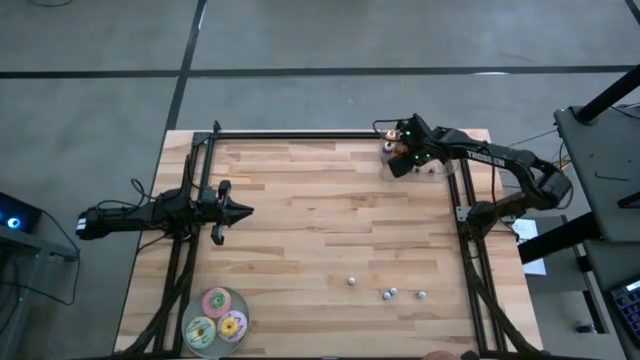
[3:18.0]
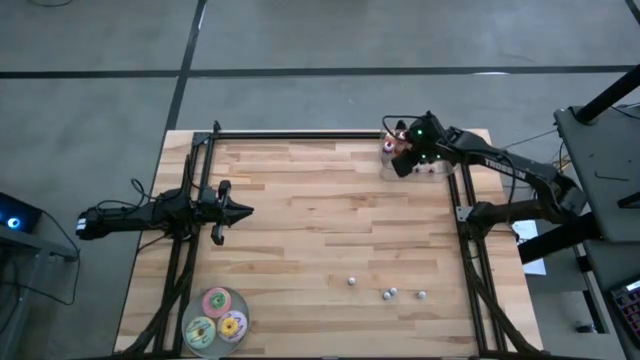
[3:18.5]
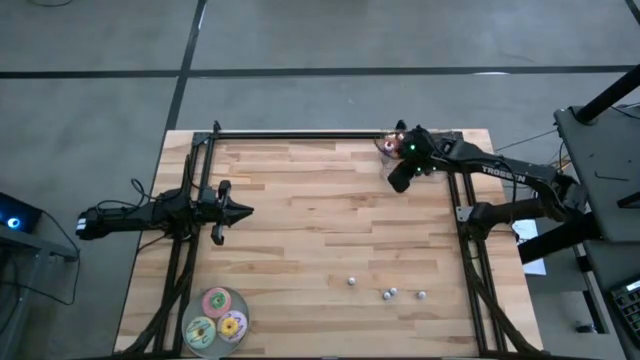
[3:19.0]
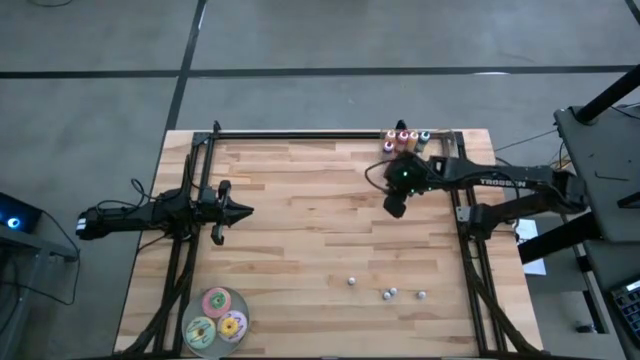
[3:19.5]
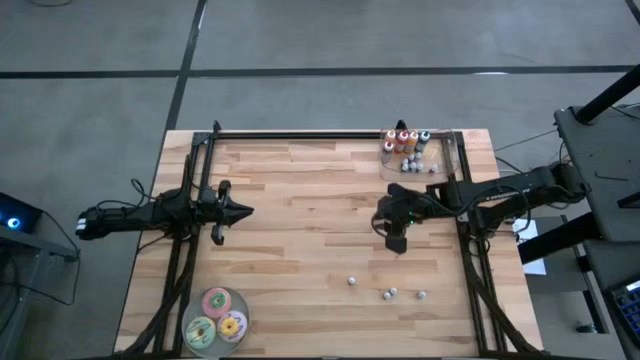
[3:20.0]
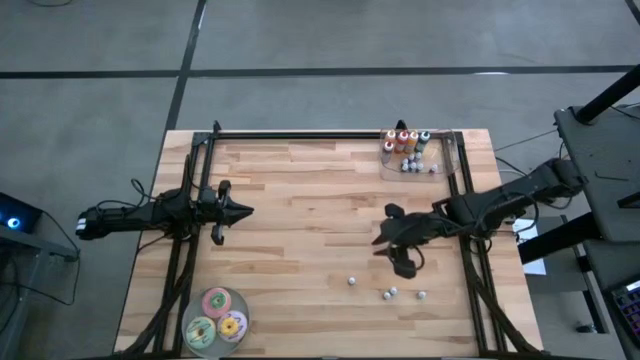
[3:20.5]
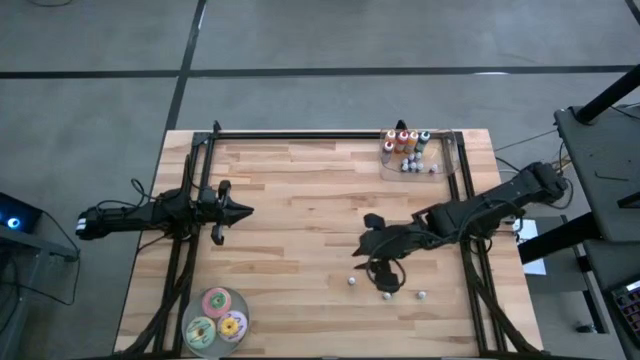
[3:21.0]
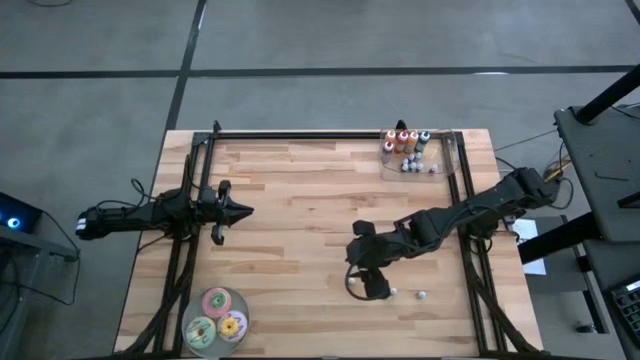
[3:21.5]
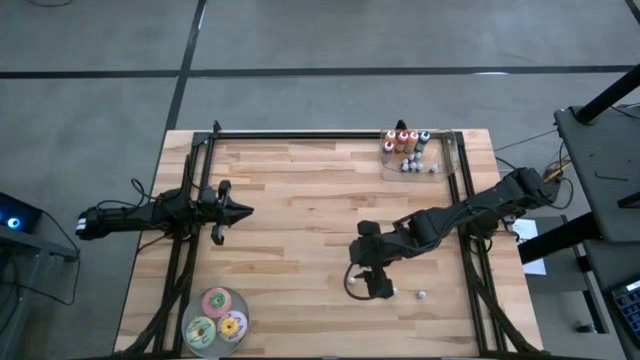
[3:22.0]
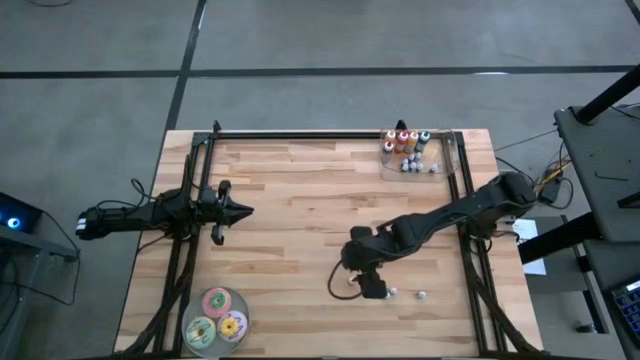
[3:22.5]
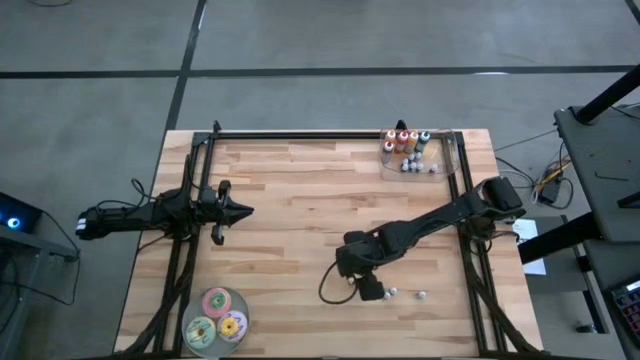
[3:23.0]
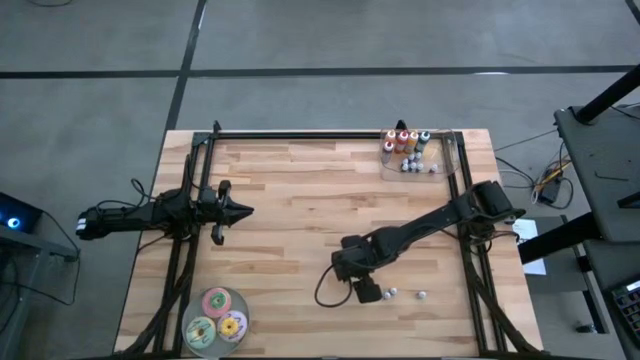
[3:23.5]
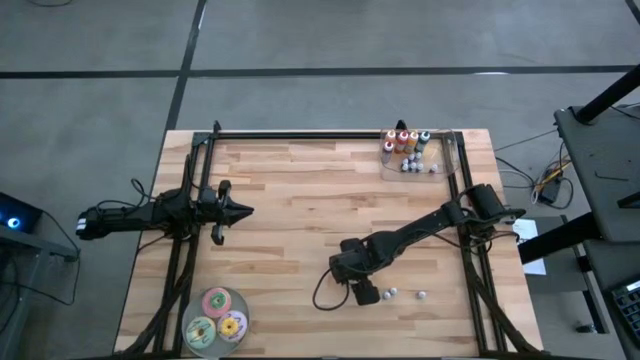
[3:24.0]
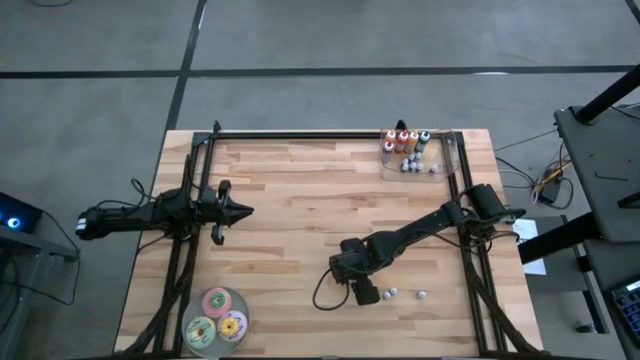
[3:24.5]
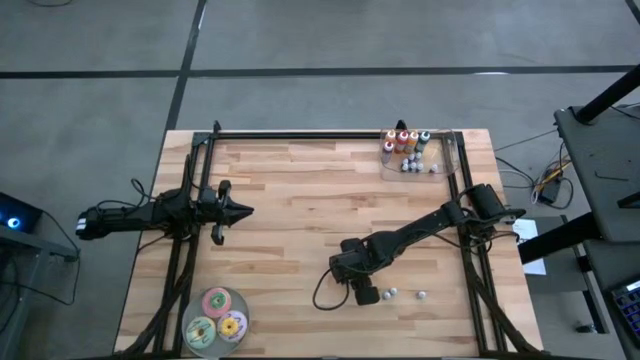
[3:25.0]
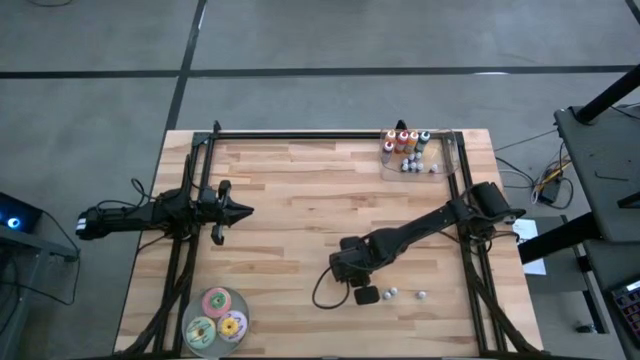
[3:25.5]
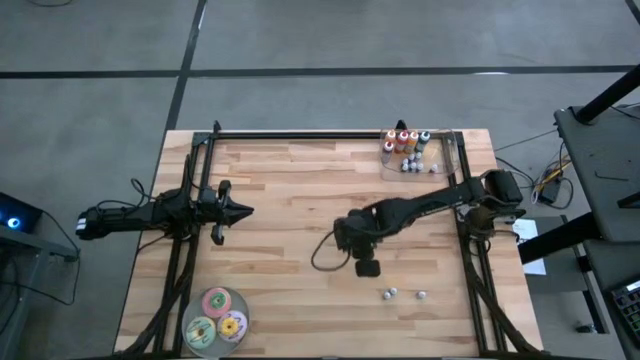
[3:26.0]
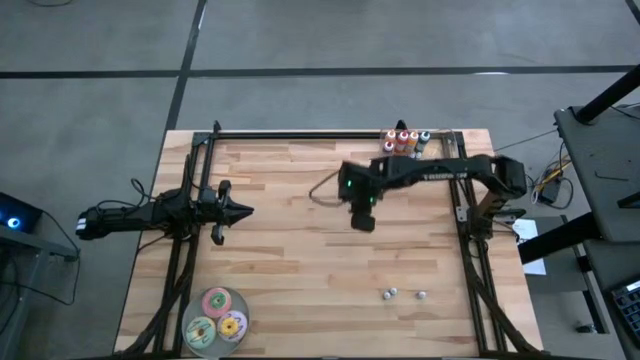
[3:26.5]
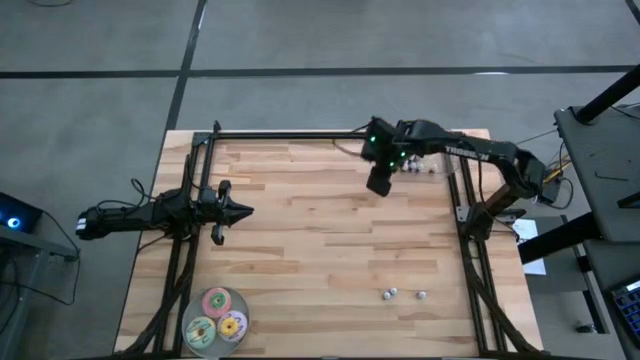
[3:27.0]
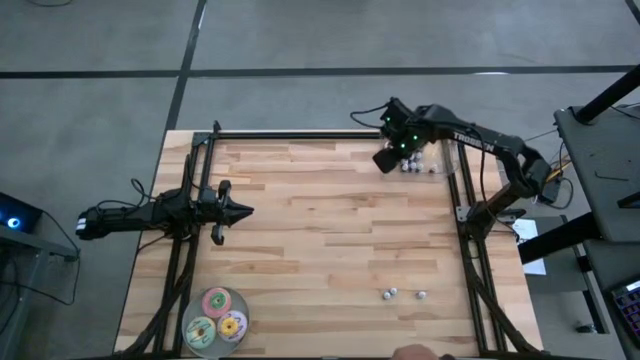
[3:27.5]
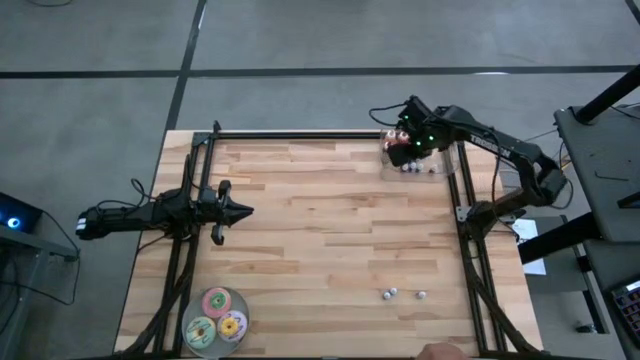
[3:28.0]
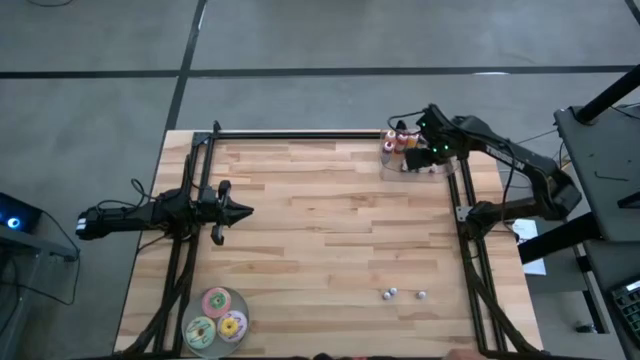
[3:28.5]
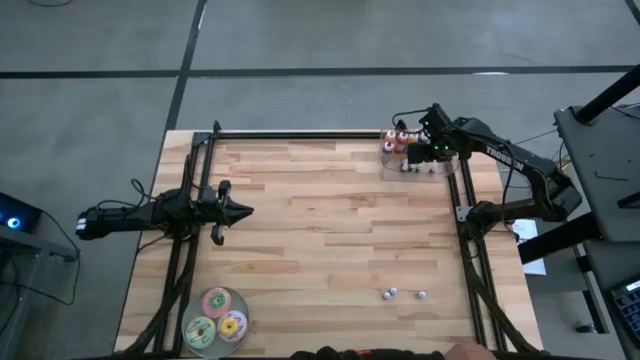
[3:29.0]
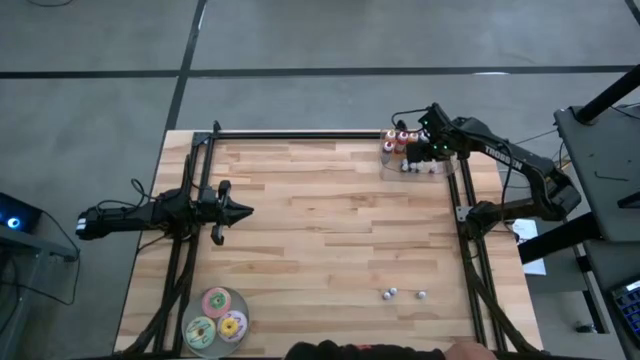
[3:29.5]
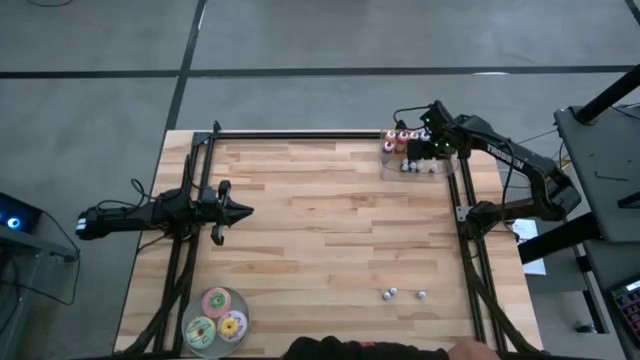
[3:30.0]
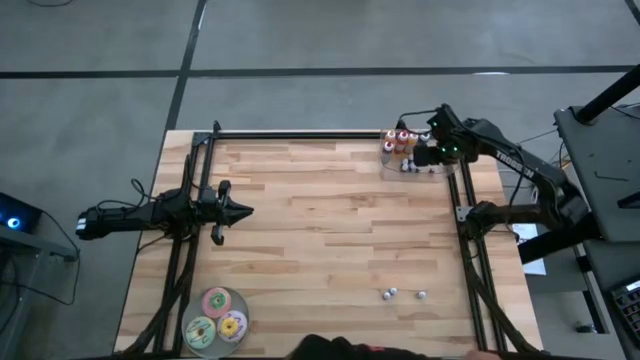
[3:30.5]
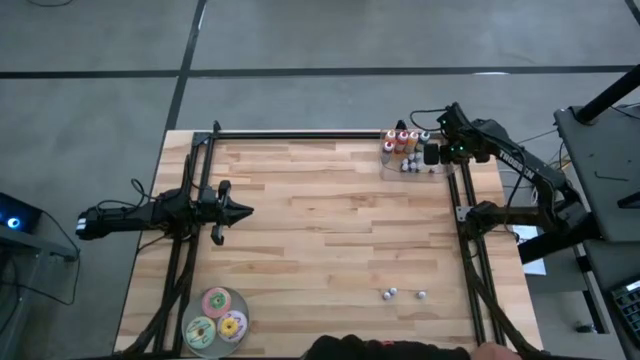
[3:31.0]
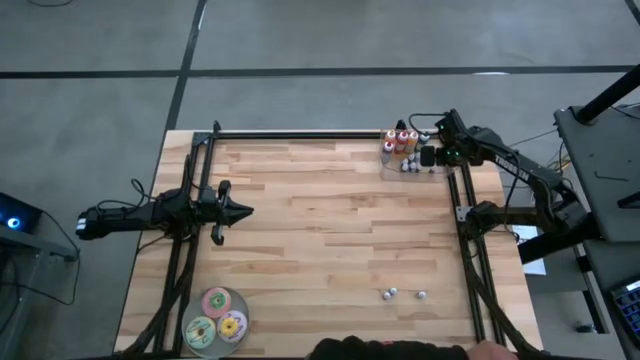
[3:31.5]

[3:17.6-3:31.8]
Task: Pick & Place food coloring
Put the small green food coloring bottle into the bin

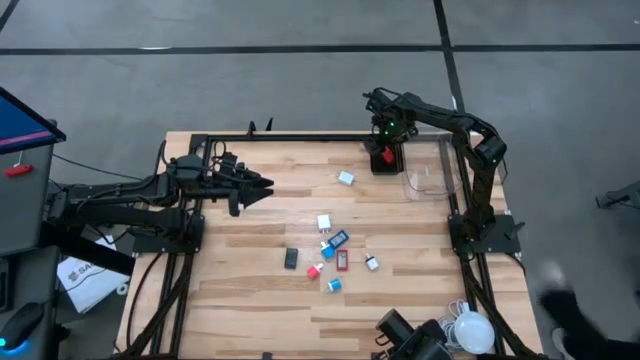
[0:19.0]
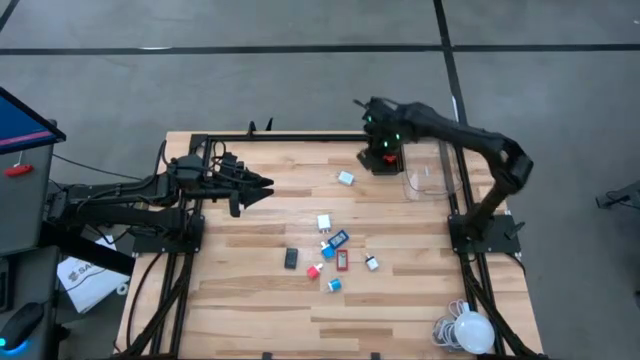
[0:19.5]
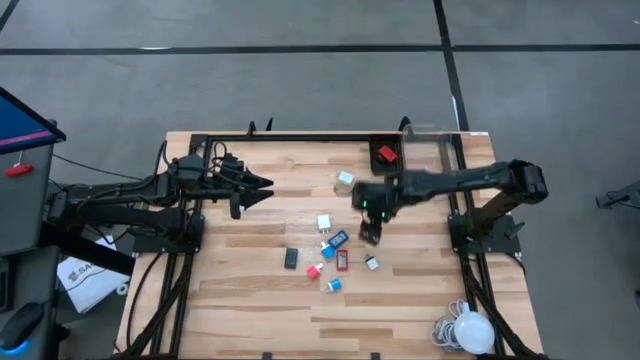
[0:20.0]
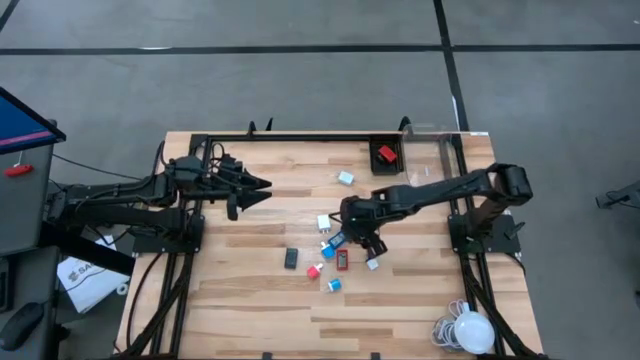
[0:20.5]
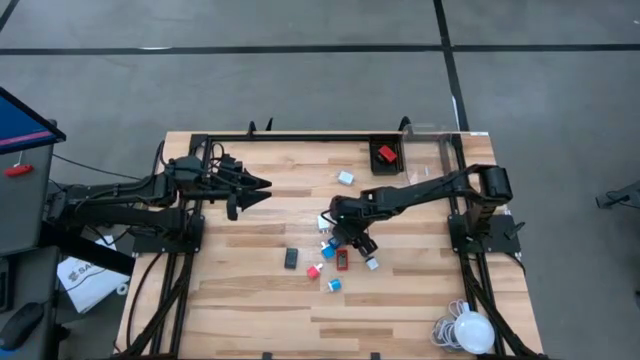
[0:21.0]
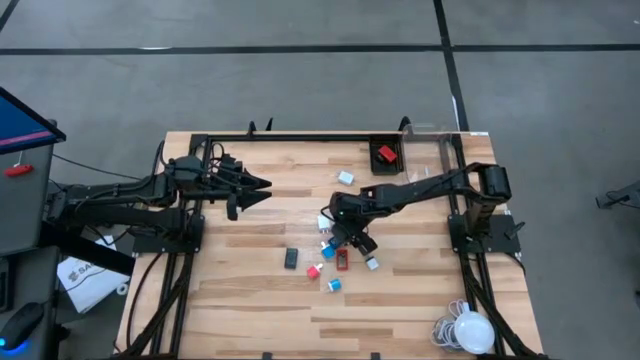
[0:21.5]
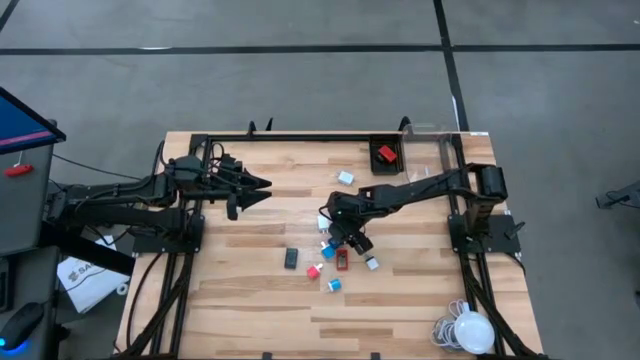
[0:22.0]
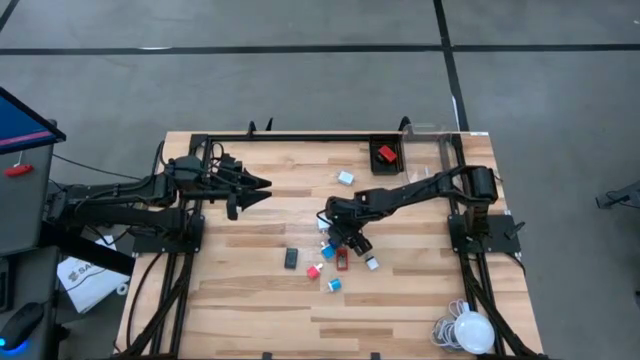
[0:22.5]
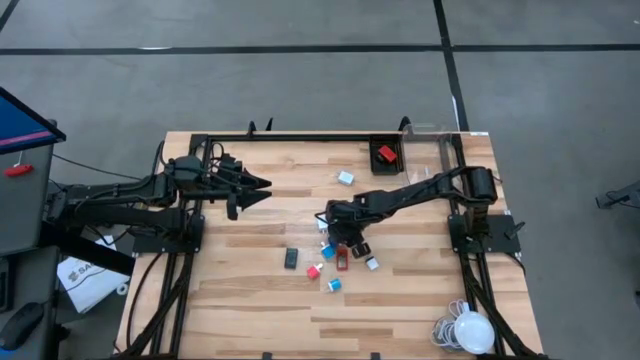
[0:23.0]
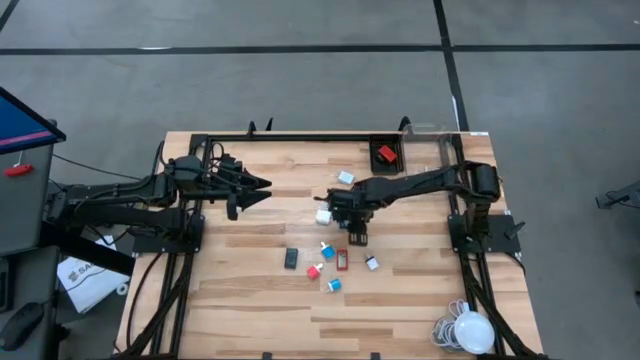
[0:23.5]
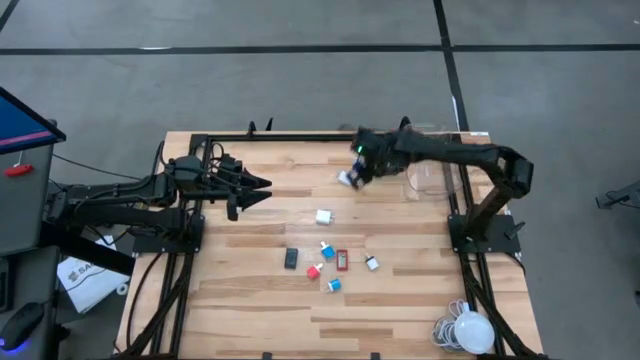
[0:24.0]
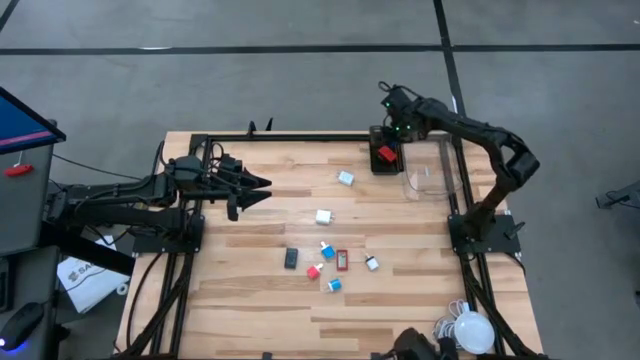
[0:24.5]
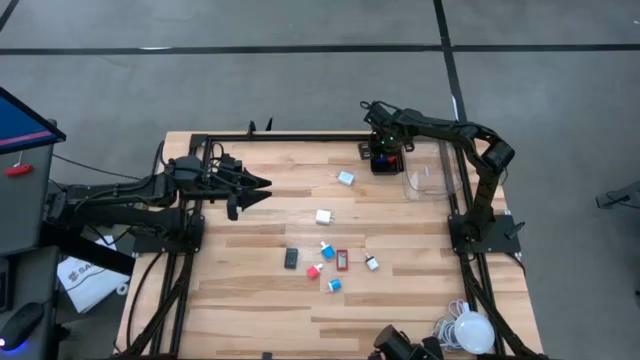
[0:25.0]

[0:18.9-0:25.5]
Task: Pick & Place Office items
Put the blue digital timer into the black bin
